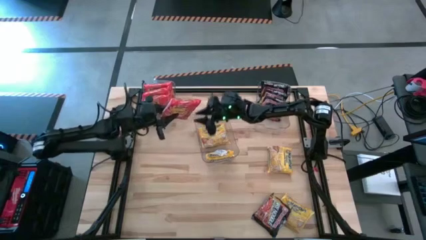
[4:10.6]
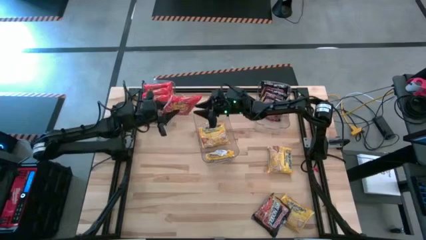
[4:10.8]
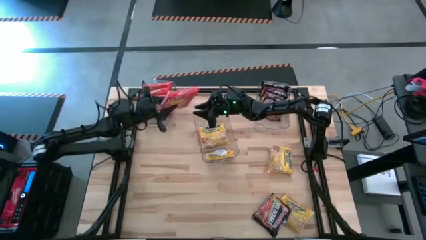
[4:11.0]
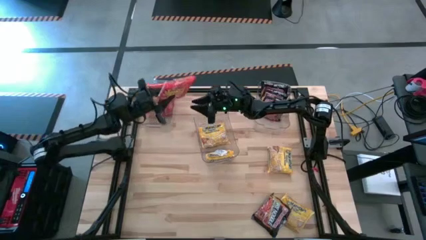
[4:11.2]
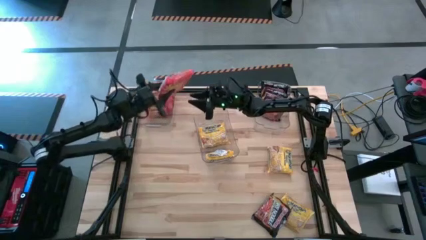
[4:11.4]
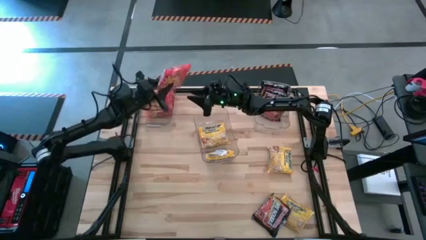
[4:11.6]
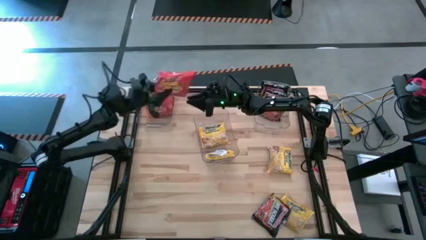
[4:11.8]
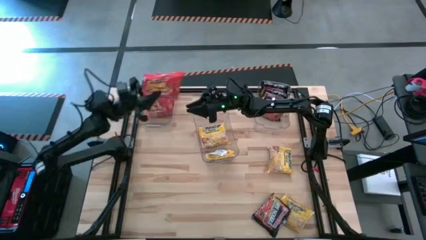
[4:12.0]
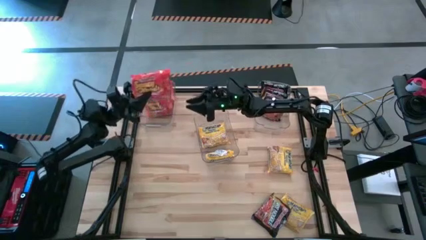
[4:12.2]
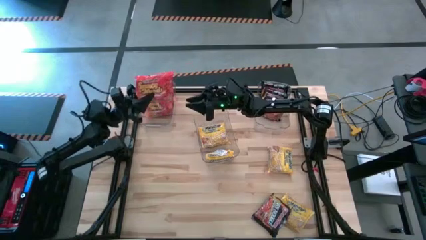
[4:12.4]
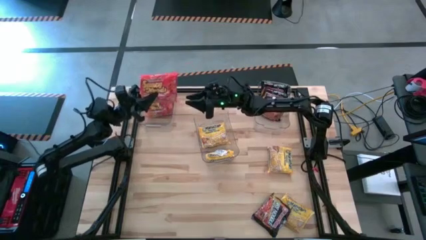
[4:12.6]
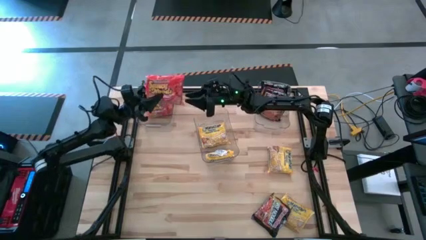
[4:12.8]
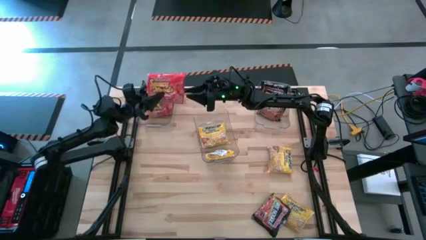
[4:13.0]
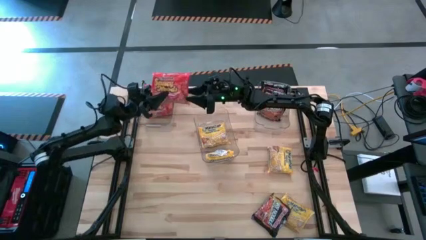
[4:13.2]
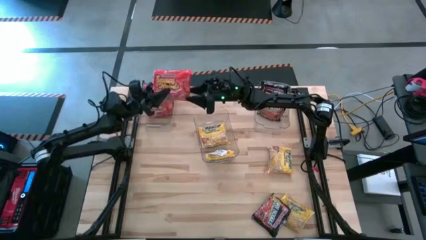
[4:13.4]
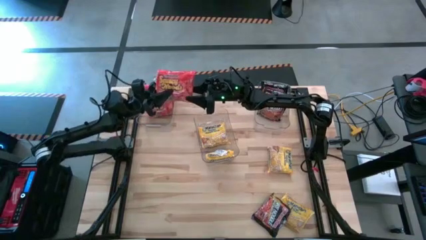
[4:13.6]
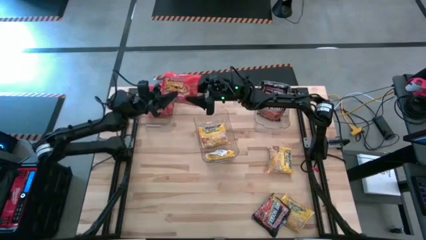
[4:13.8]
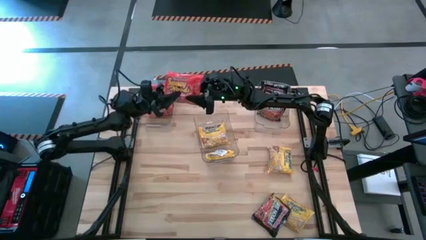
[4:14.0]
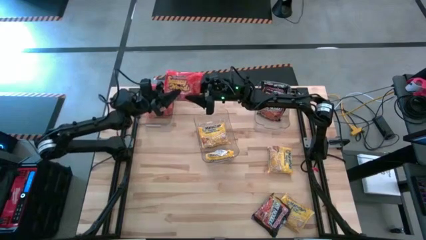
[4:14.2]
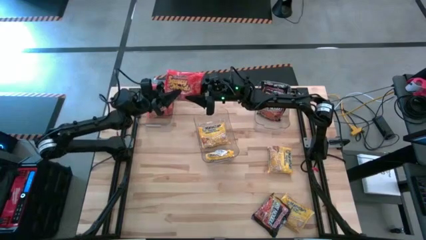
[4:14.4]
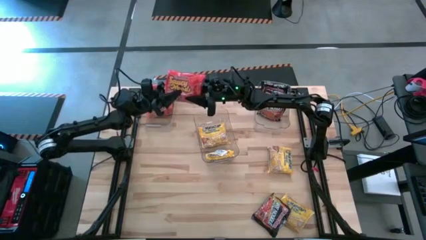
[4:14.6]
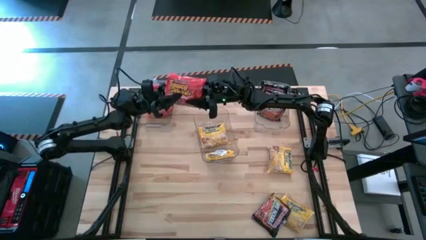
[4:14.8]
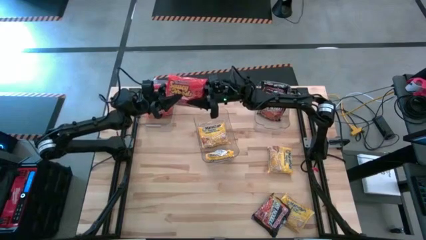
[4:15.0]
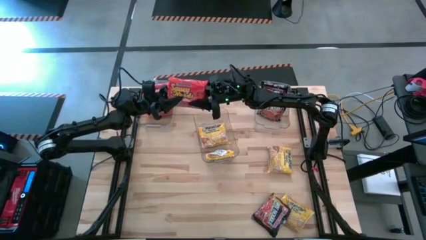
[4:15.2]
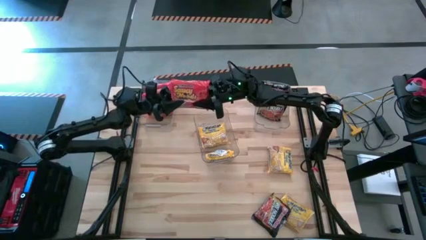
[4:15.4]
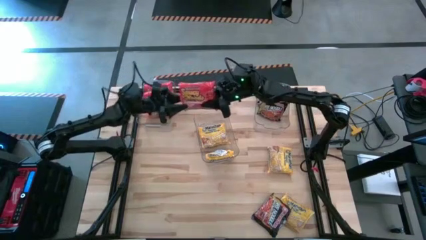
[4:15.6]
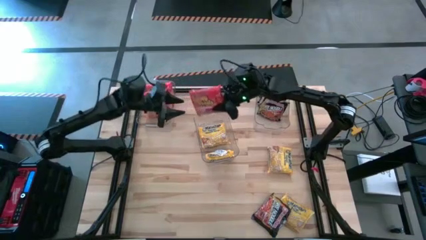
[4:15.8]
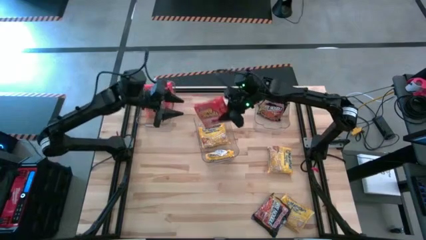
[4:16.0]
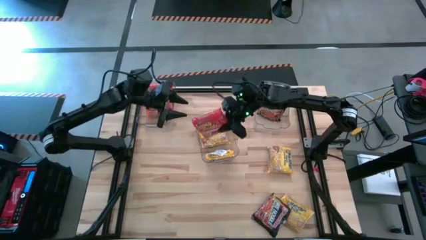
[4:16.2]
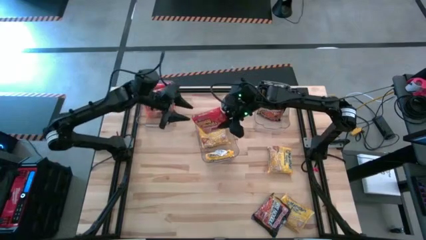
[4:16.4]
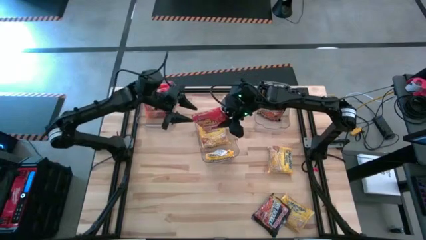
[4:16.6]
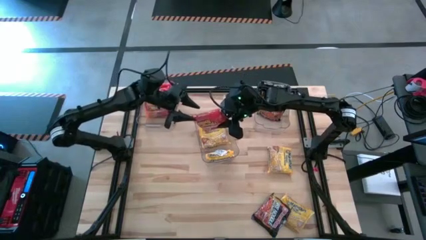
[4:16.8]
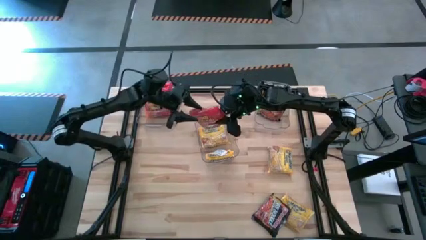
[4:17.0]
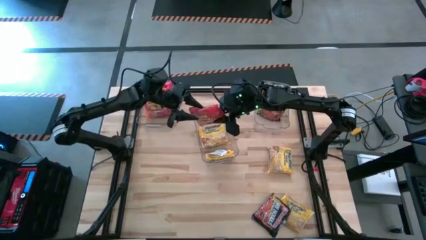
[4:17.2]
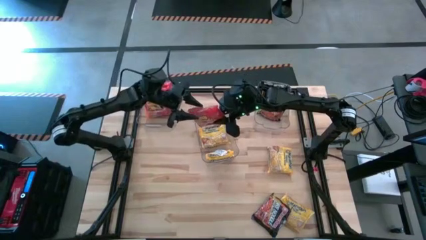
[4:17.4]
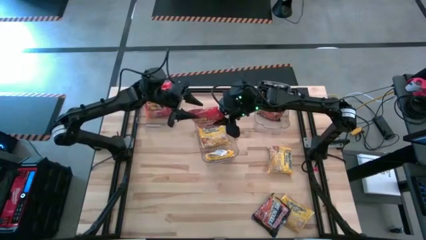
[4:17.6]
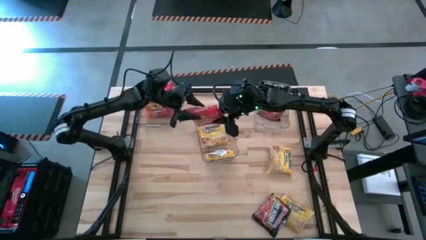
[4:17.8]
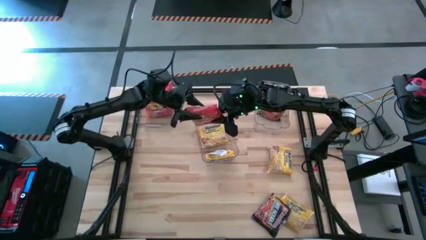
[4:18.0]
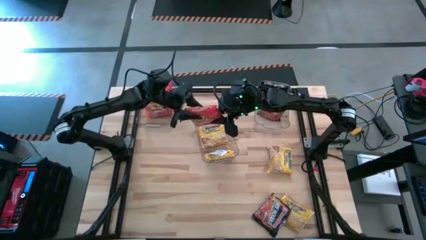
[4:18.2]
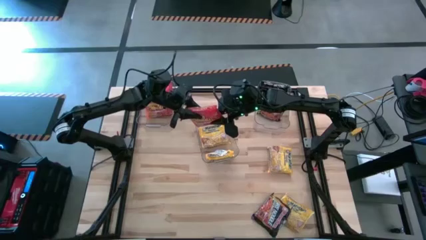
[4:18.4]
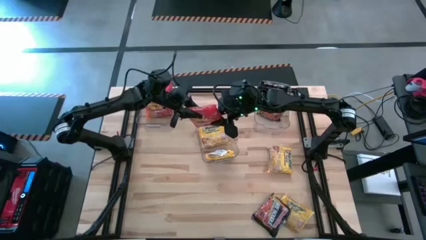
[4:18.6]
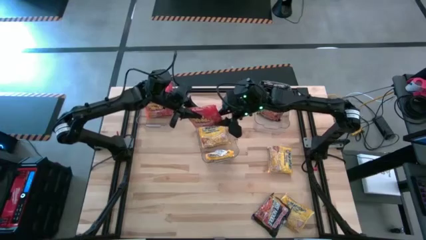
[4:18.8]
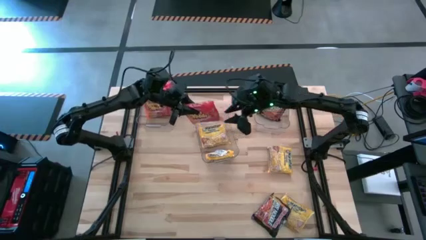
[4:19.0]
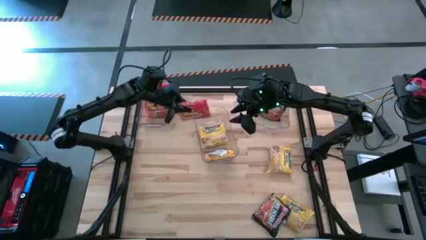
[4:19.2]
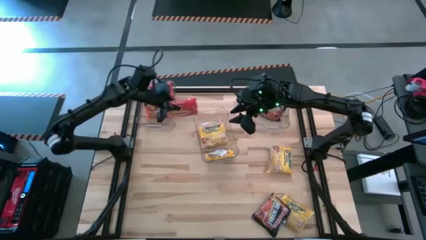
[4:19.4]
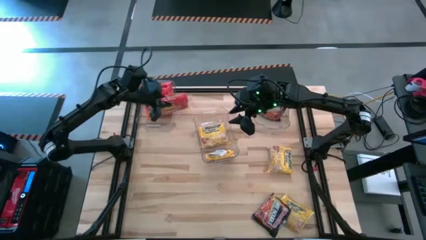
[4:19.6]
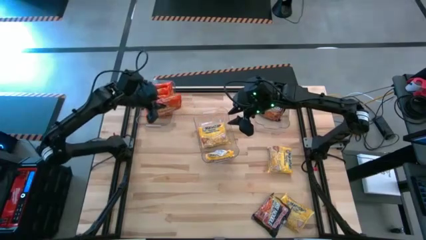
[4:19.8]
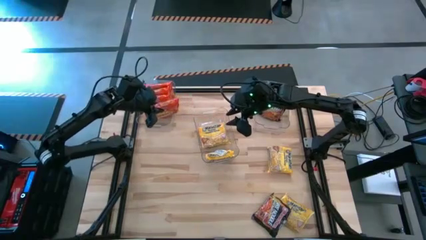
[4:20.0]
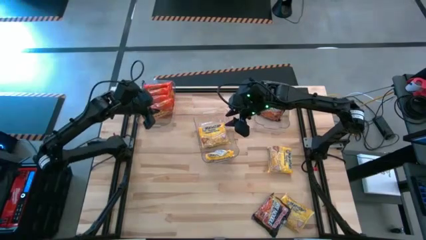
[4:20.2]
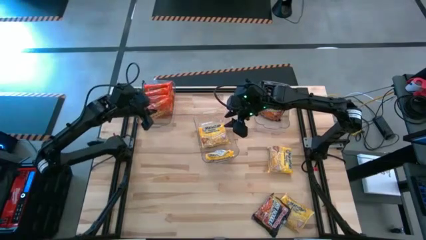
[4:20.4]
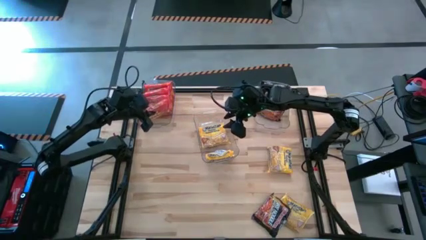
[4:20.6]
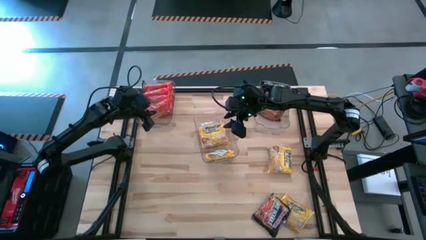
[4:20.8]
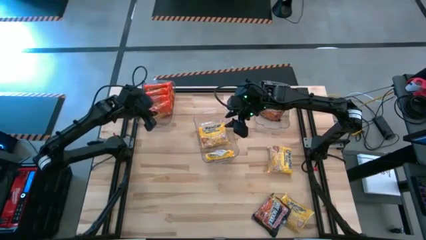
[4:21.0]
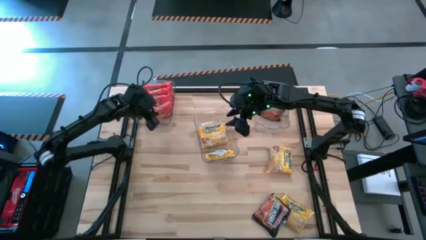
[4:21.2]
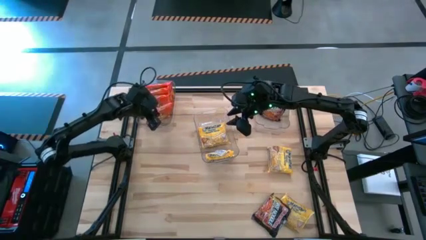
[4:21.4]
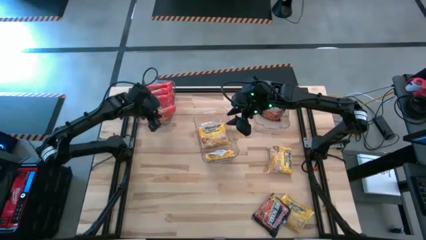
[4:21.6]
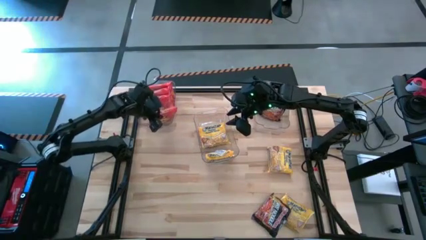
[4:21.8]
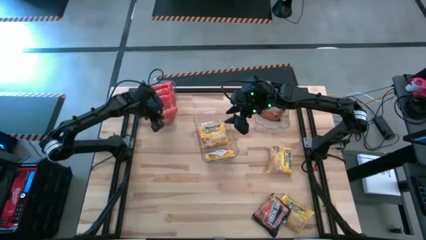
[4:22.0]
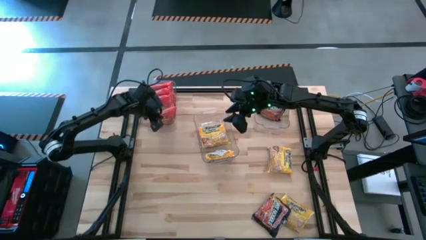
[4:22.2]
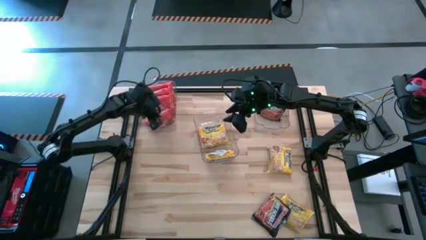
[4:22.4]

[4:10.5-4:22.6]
Task: Sort Maruchan noodles
Put the orange noodle pack into the top left transparent bin

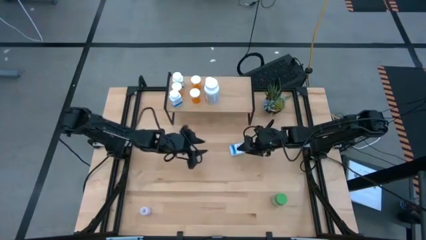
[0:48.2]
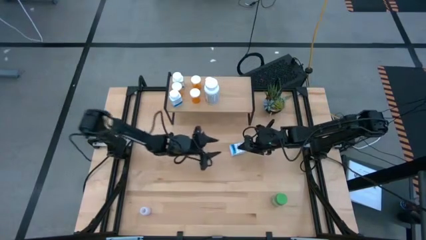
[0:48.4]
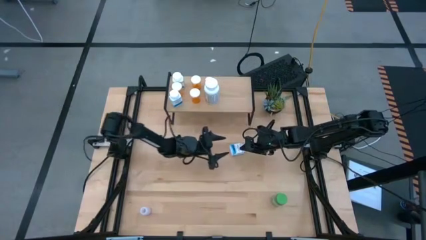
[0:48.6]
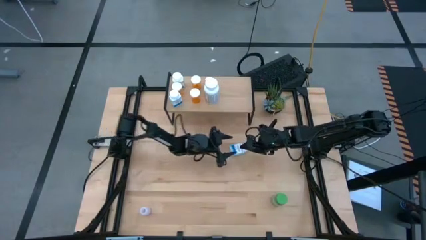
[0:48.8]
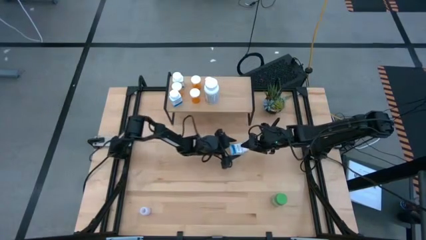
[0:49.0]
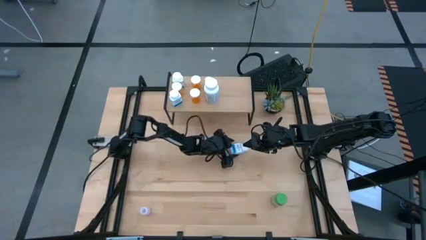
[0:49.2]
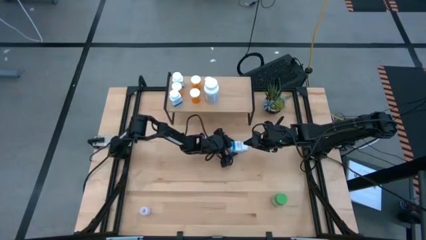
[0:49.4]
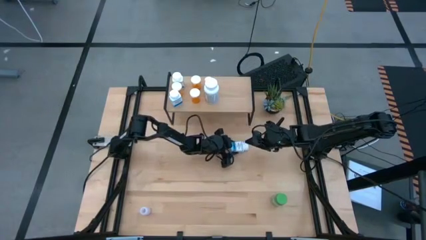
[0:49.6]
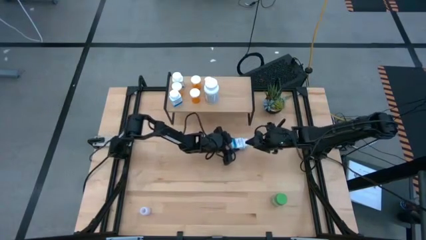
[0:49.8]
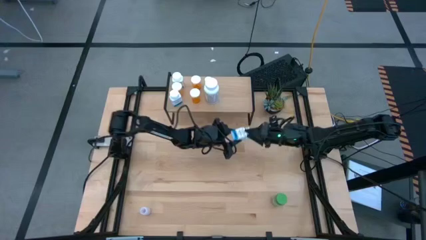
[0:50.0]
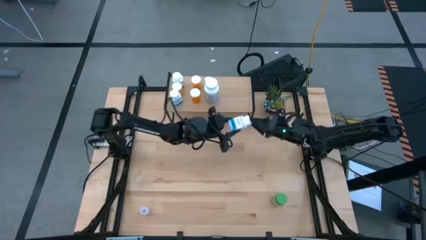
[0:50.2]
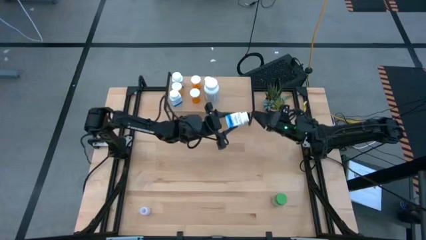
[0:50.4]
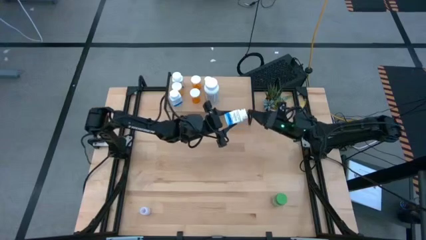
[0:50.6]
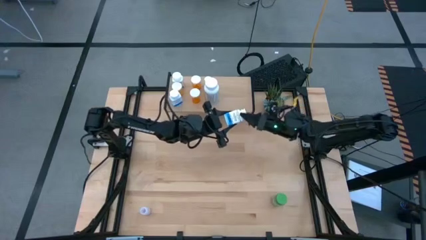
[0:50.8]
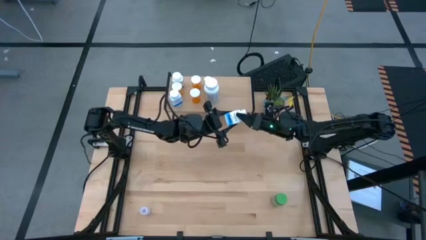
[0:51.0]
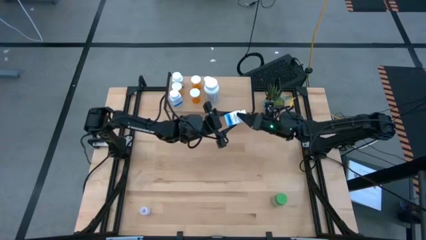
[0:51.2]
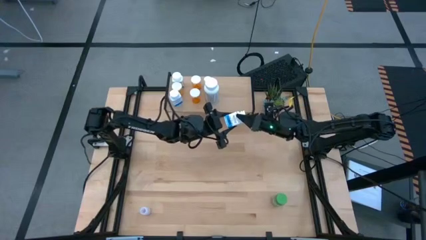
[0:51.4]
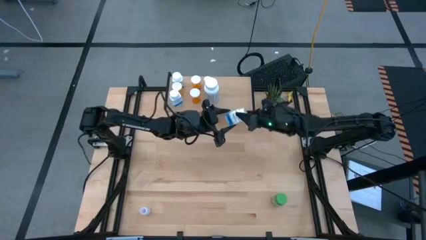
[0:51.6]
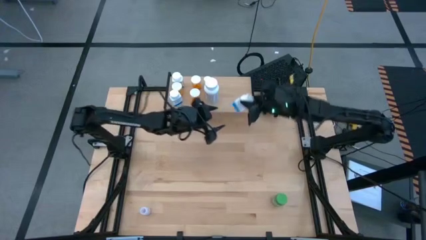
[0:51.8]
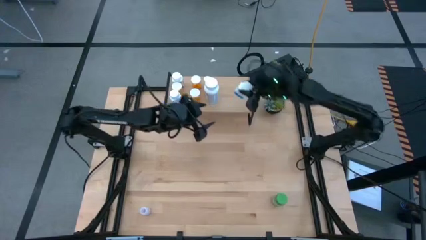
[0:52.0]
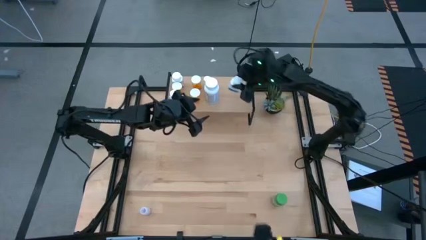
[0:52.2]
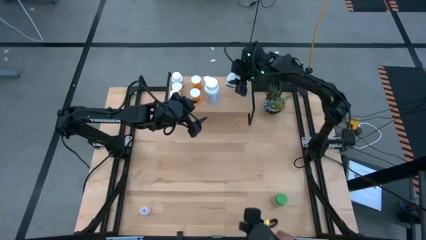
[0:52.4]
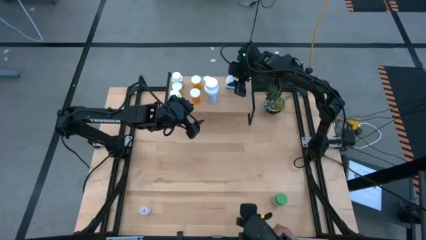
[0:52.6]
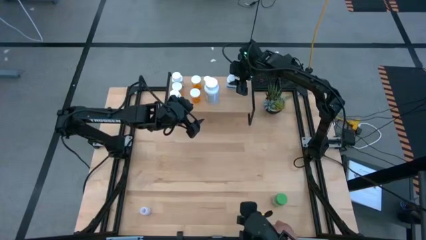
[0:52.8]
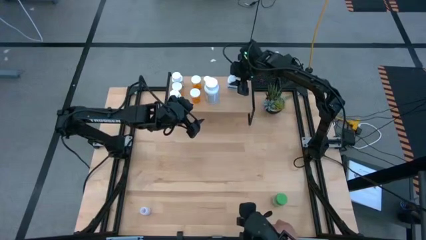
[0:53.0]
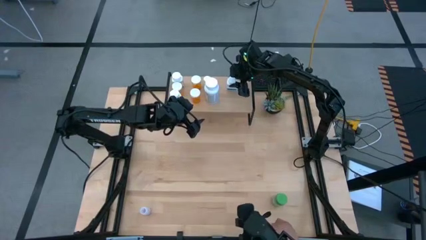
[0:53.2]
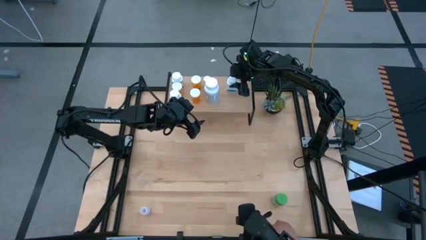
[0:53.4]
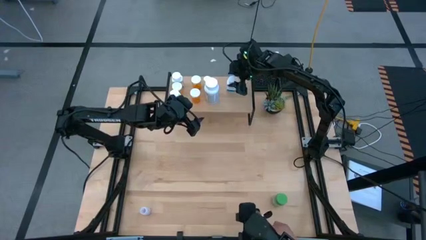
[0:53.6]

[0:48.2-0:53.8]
Task: Pick and place medicine bottles onto shelf by color
Put the blue pill bottle on the shelf
